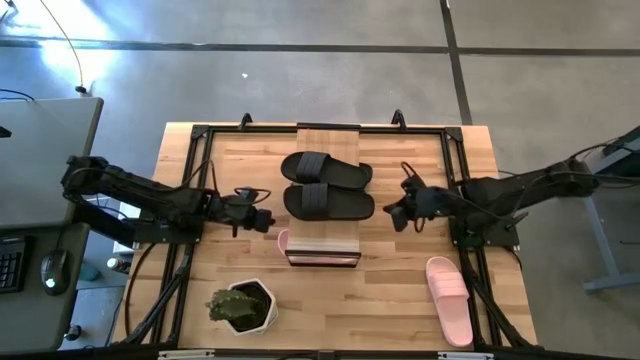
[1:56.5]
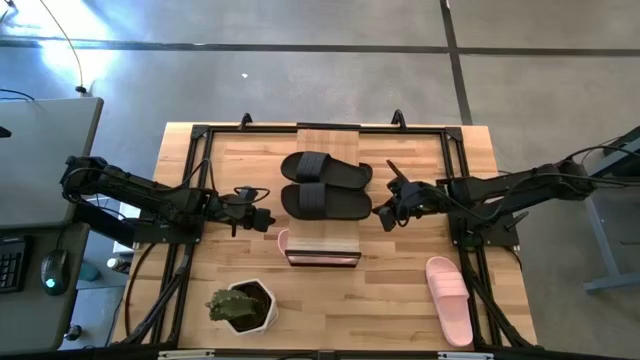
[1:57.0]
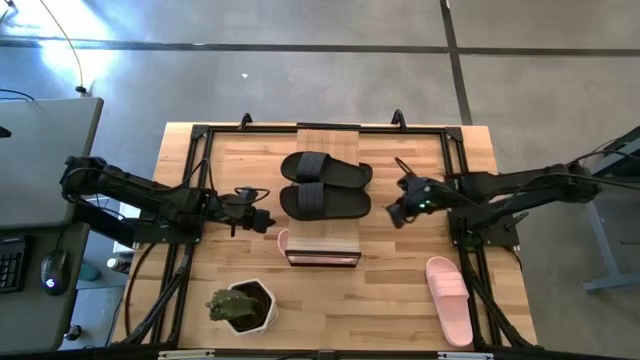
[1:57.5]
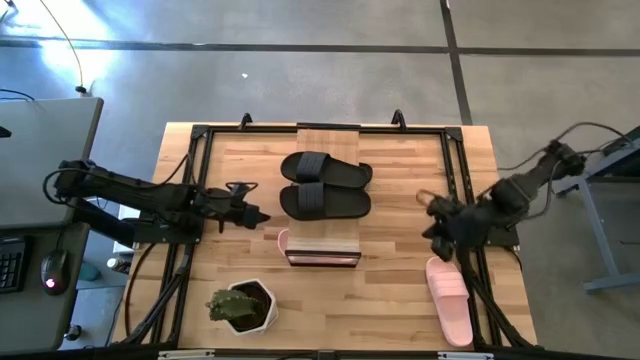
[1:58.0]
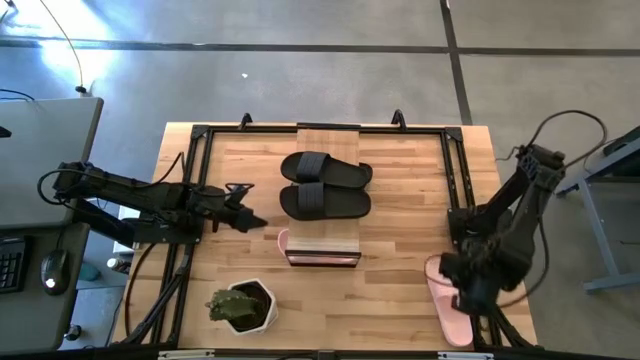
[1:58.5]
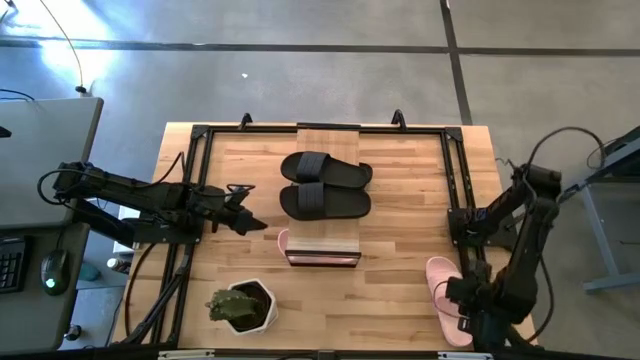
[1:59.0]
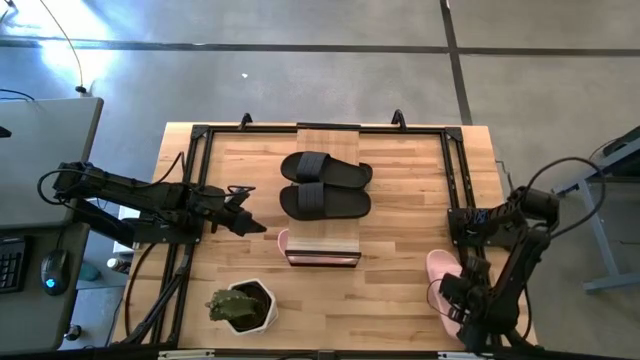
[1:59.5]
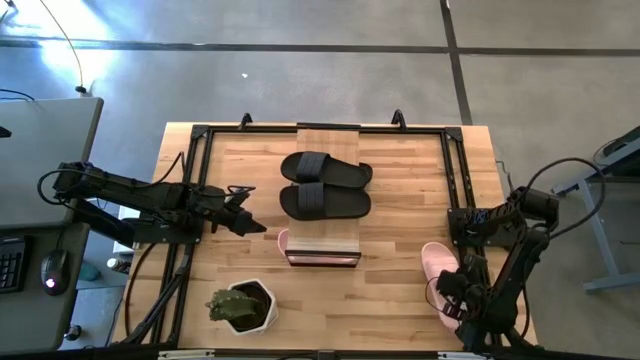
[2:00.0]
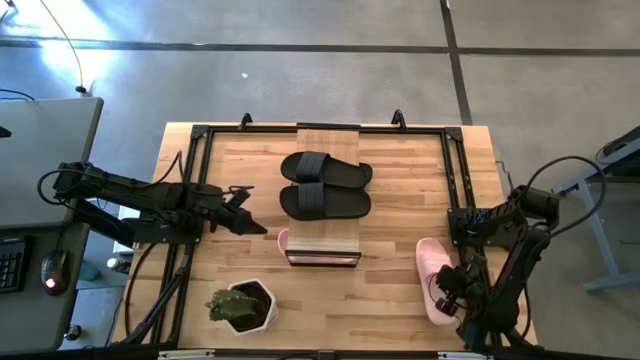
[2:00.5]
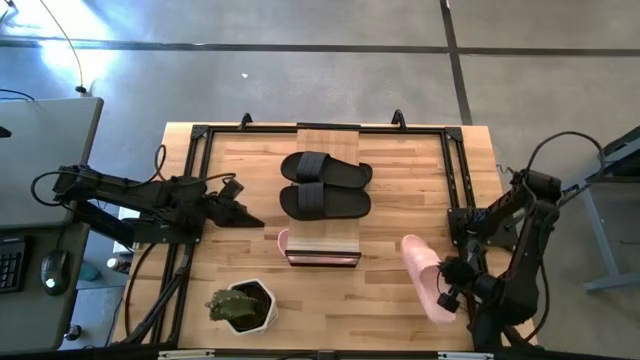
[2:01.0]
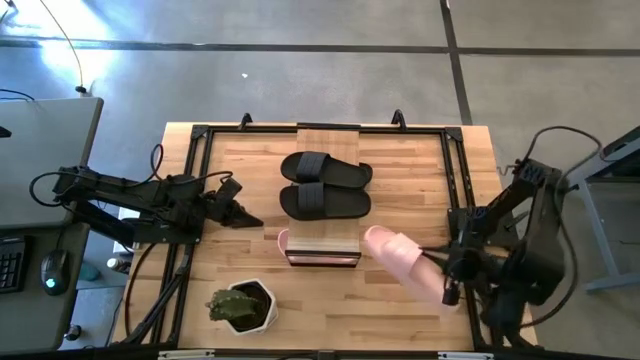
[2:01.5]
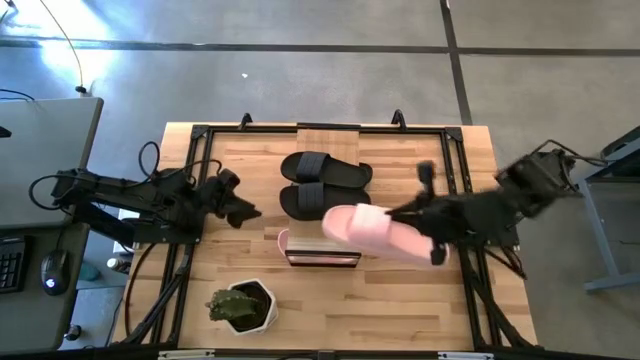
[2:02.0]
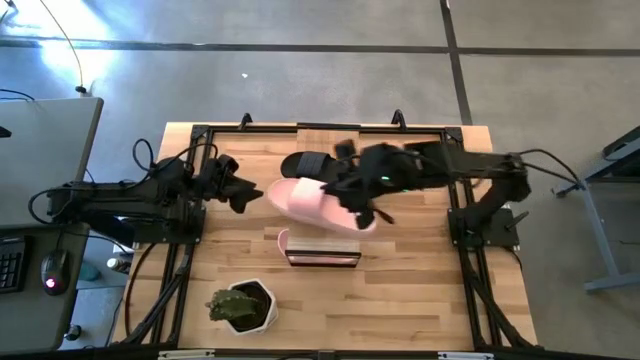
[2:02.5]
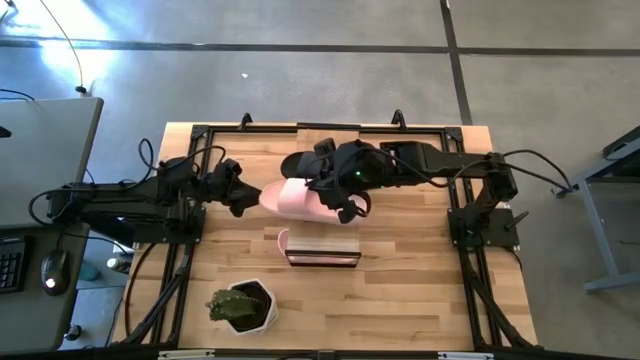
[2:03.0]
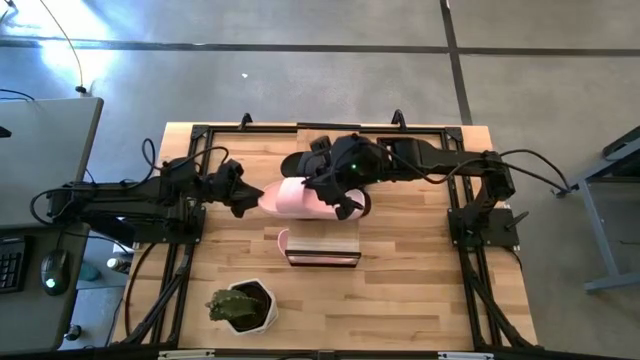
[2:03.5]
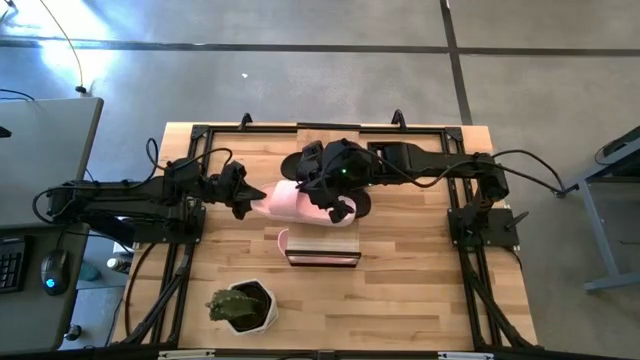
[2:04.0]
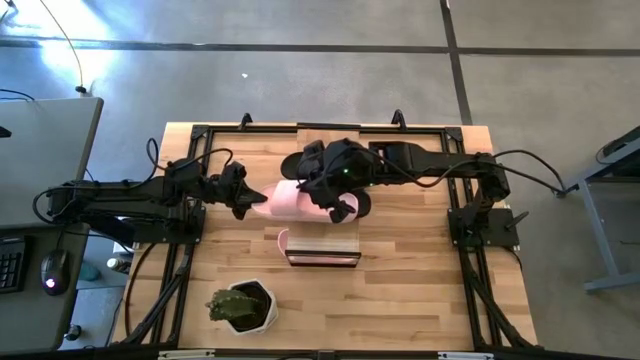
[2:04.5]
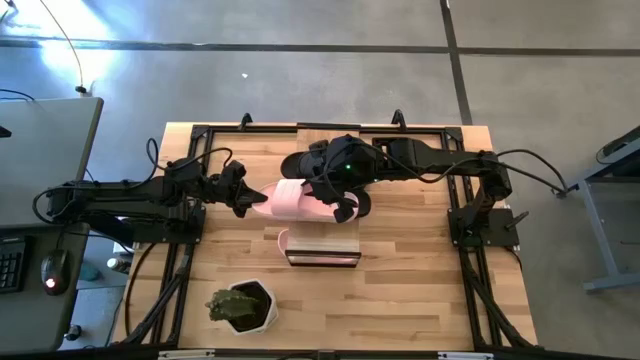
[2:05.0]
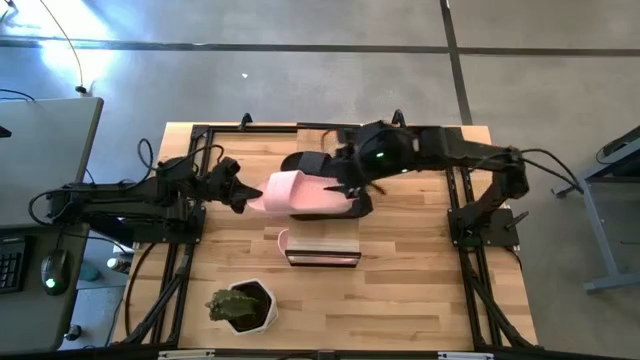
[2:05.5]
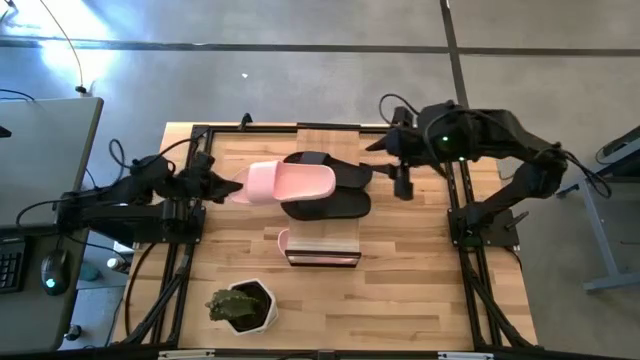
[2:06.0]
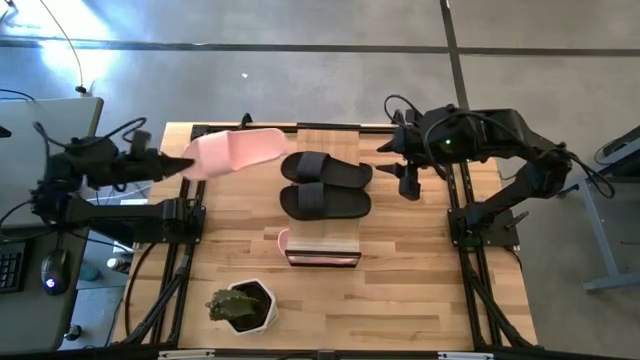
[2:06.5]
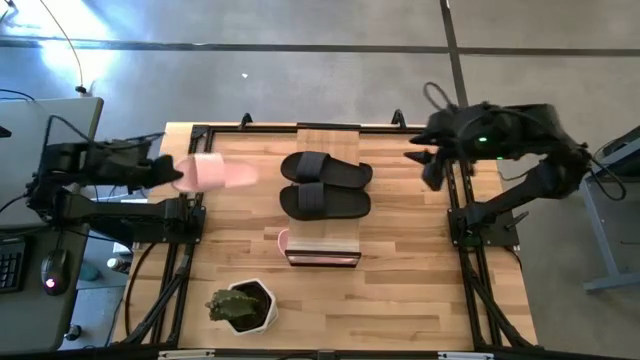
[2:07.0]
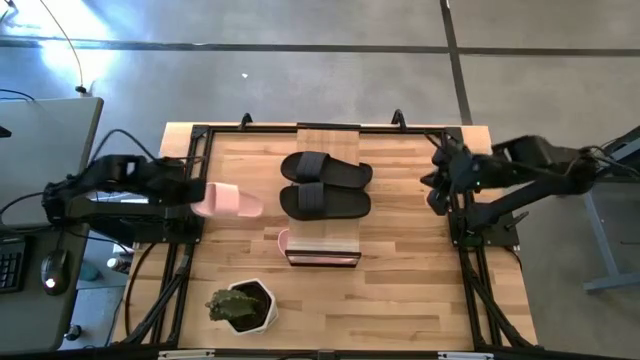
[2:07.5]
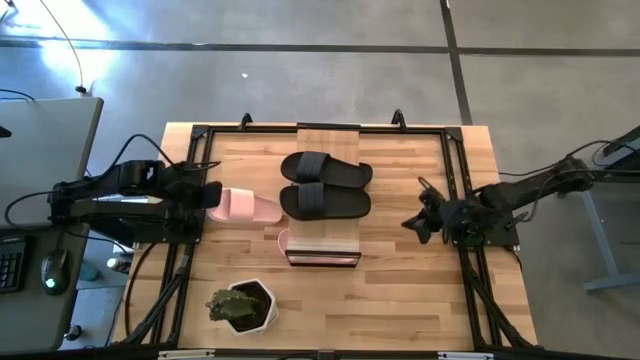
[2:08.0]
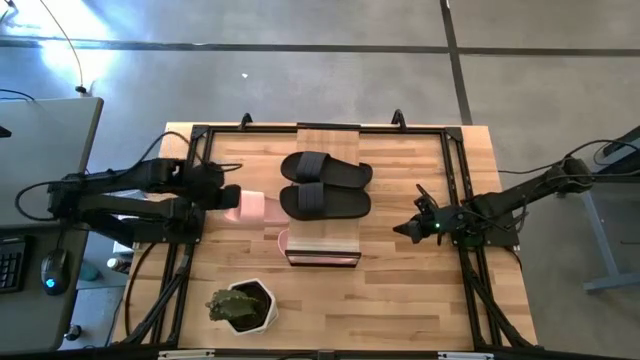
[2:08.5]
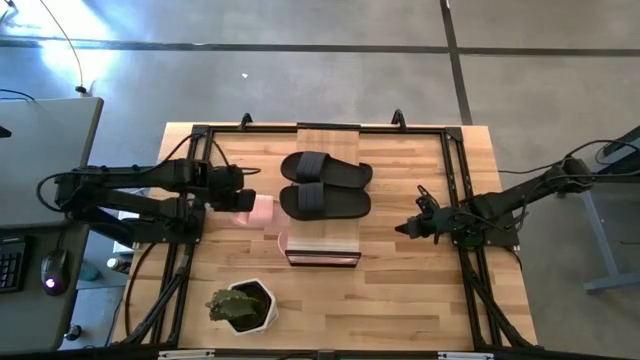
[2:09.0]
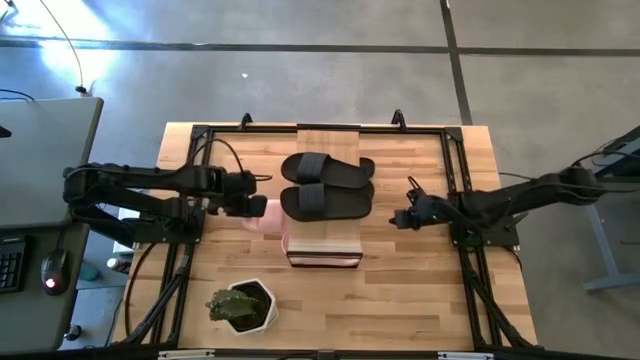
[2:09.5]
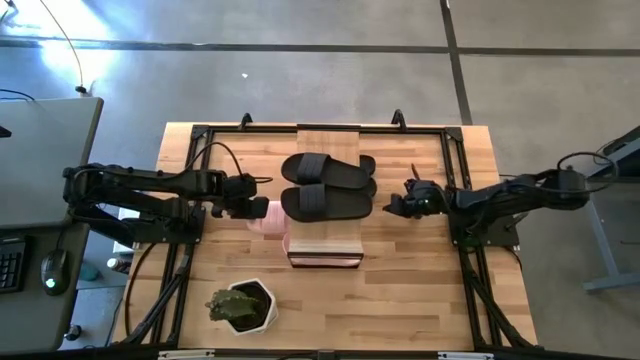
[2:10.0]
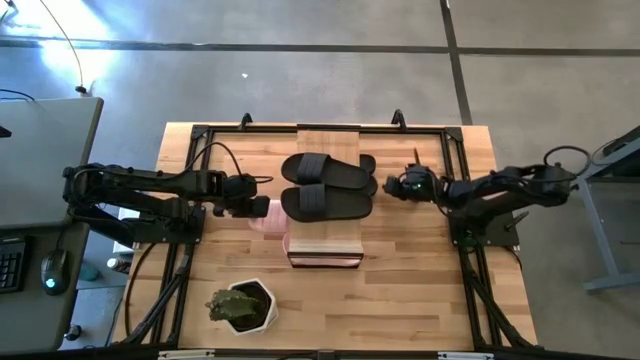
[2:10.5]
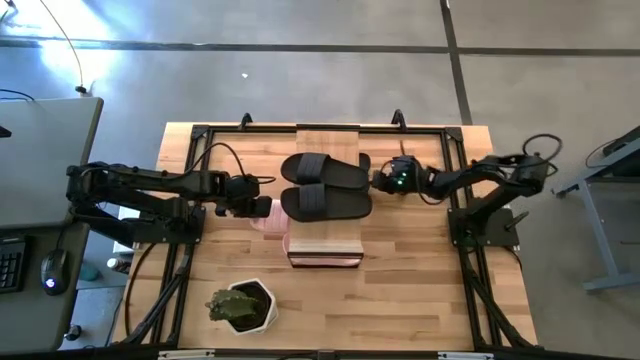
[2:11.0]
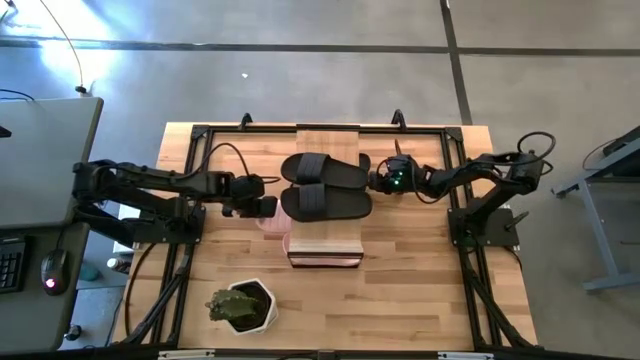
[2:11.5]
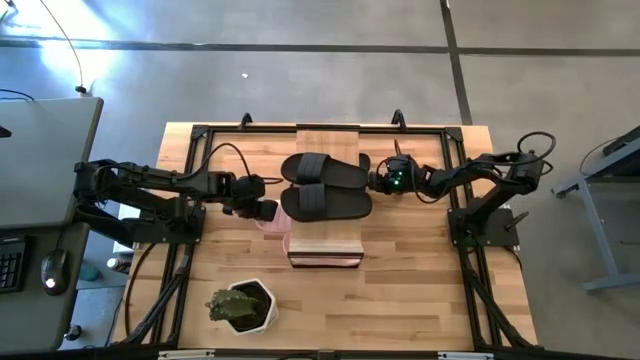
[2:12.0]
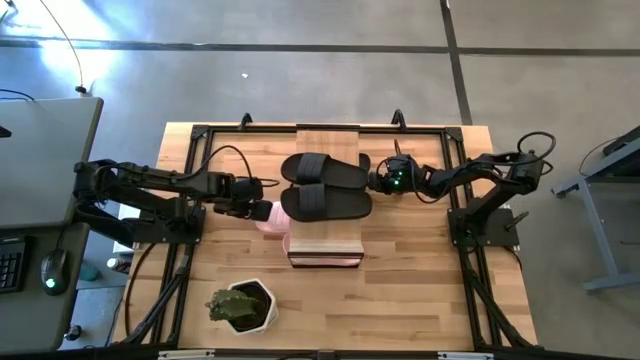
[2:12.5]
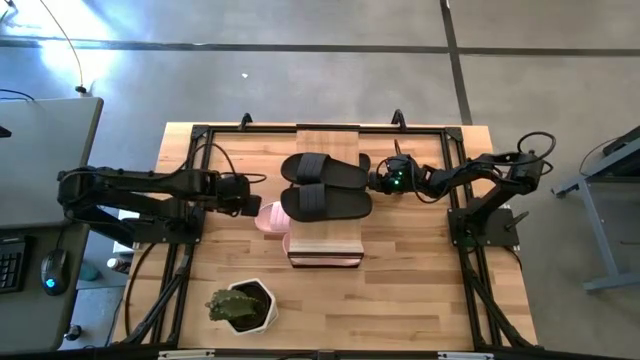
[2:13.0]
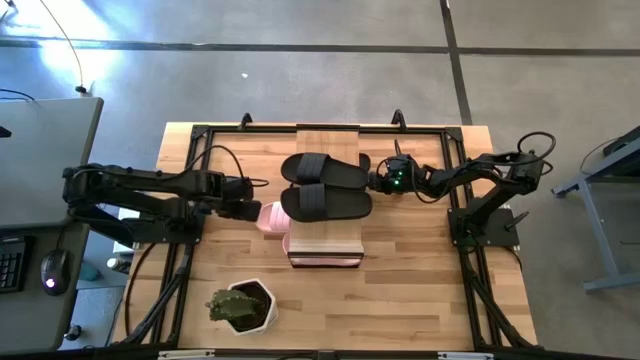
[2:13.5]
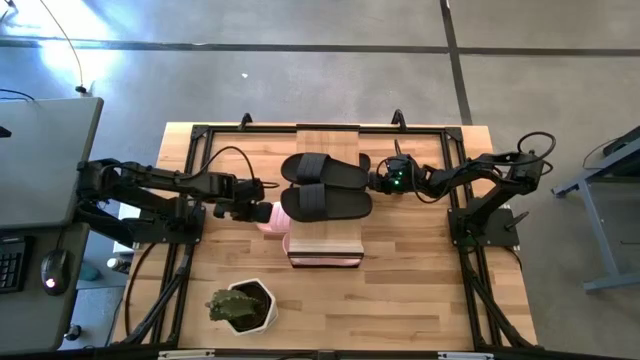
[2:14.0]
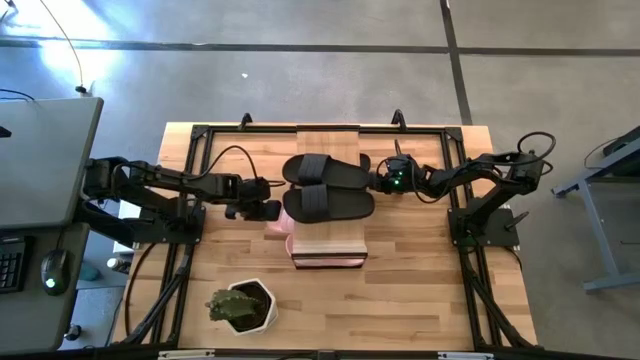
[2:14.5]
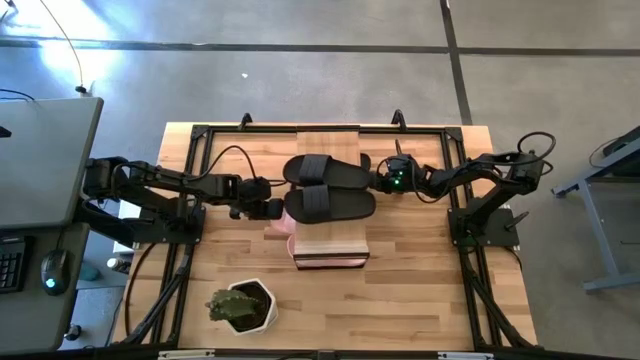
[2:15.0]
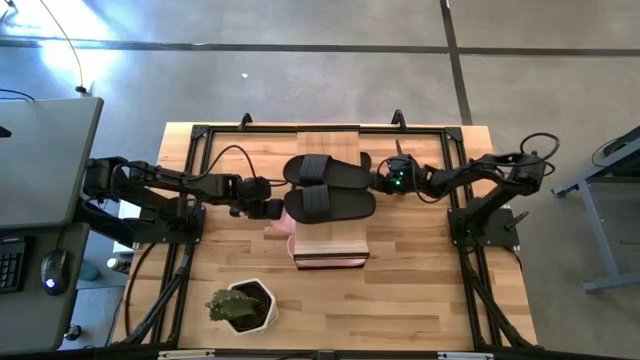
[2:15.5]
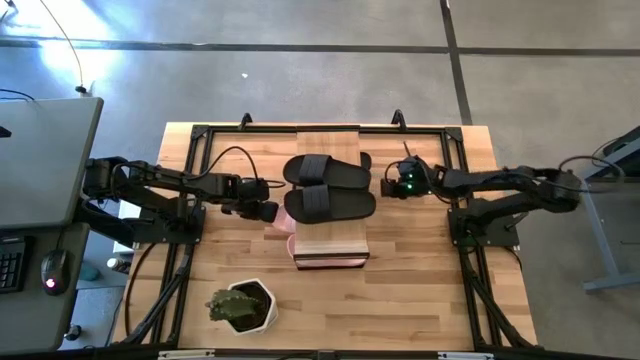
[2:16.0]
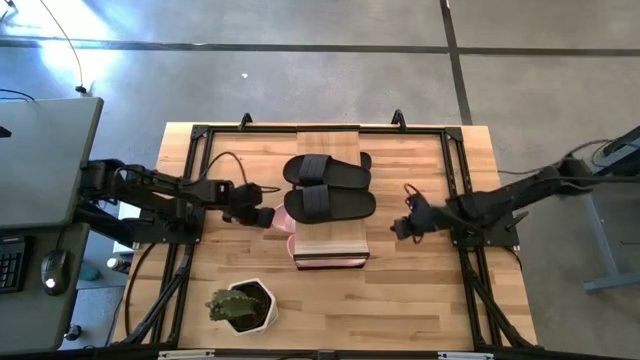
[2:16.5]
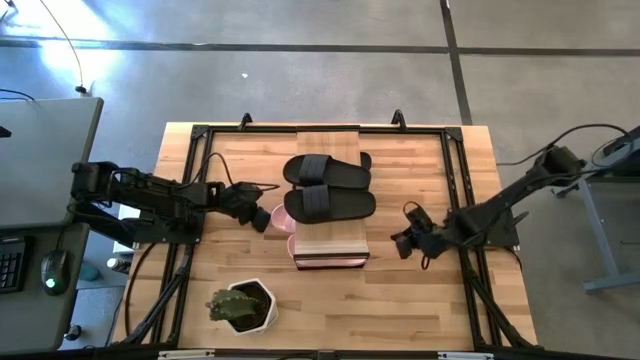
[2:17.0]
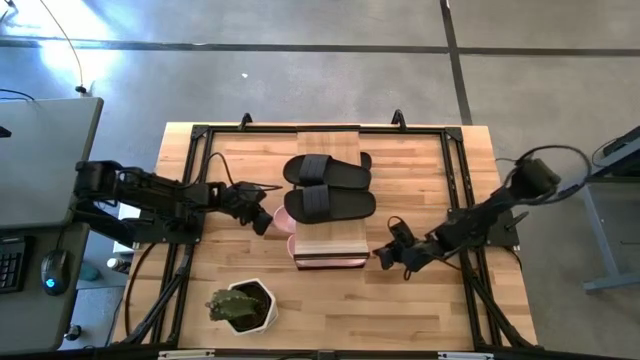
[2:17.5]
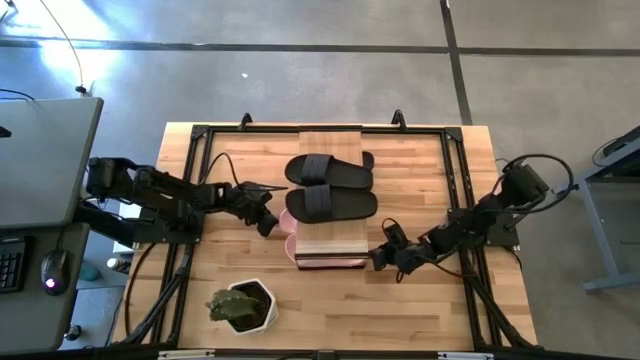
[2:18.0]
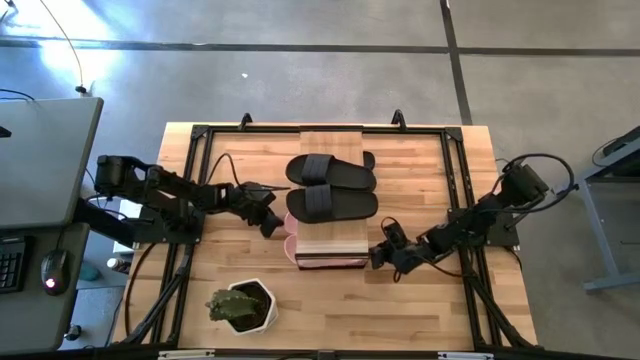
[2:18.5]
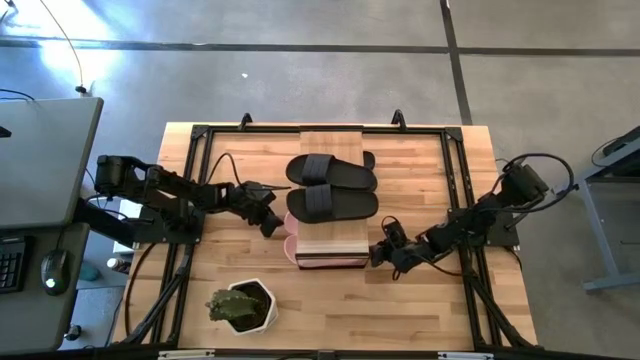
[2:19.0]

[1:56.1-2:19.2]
Task: Pick and place slides into the shelf
Put the pink slipper under the shelf
